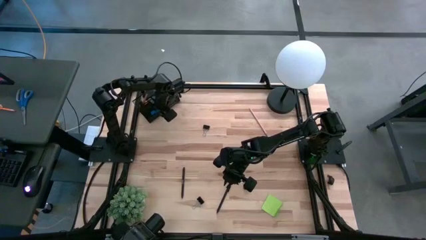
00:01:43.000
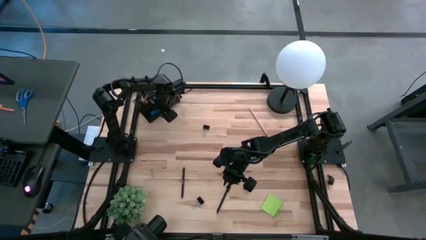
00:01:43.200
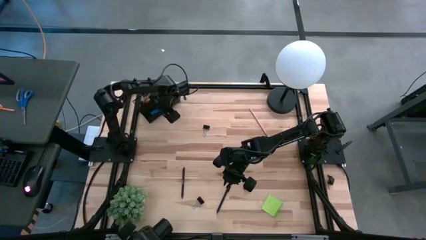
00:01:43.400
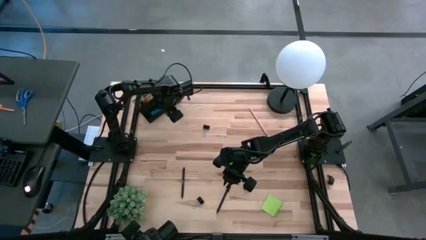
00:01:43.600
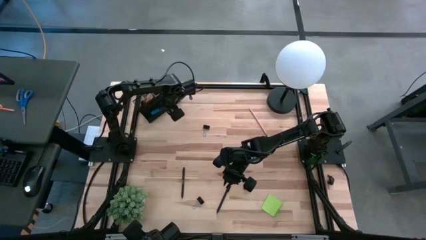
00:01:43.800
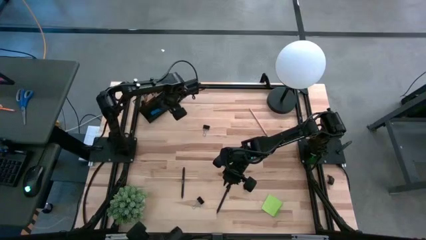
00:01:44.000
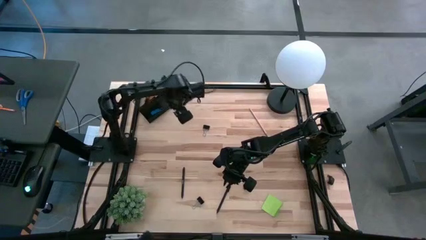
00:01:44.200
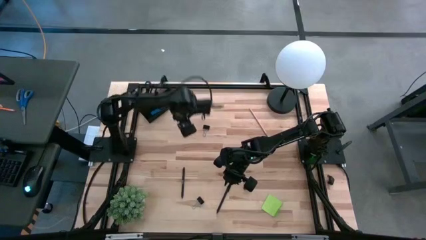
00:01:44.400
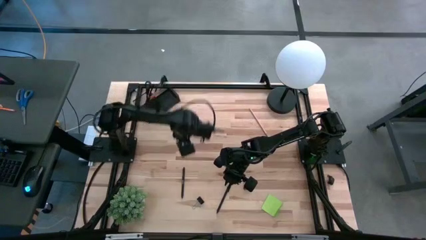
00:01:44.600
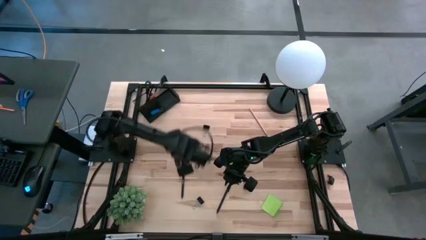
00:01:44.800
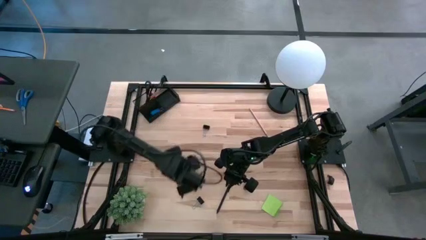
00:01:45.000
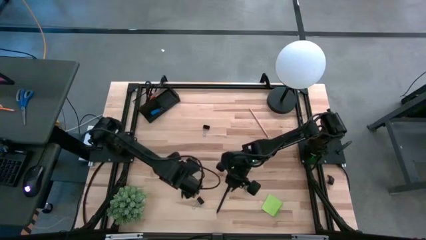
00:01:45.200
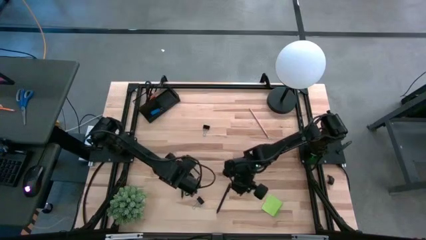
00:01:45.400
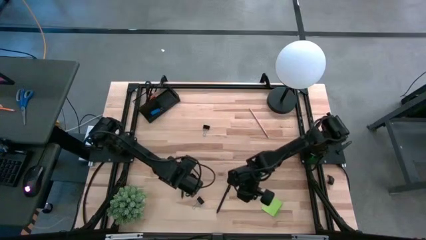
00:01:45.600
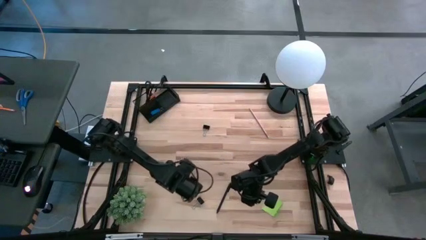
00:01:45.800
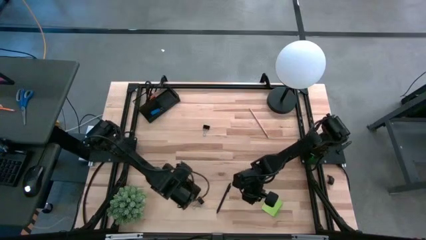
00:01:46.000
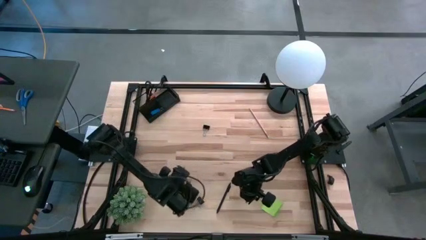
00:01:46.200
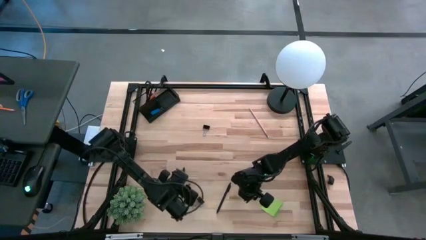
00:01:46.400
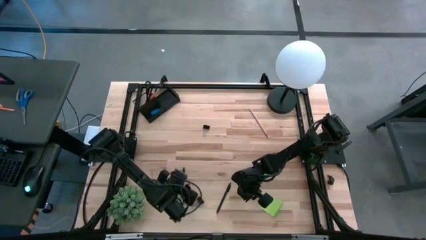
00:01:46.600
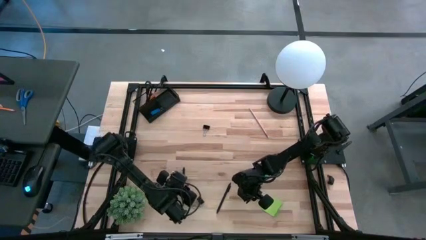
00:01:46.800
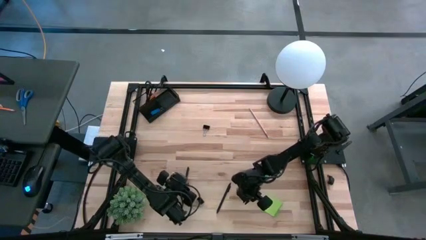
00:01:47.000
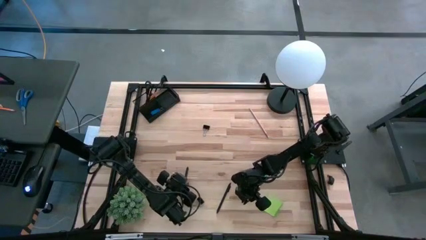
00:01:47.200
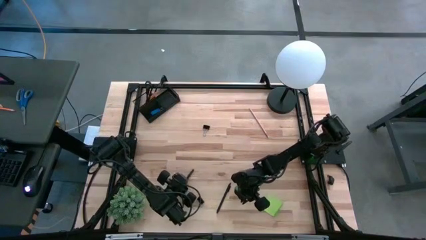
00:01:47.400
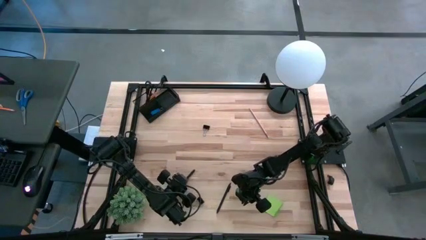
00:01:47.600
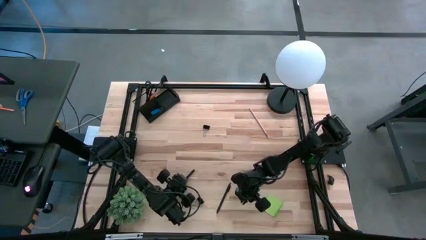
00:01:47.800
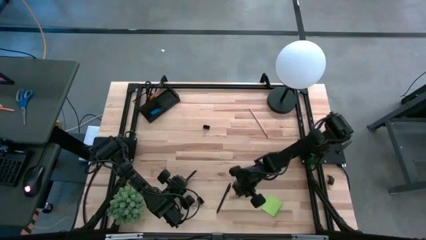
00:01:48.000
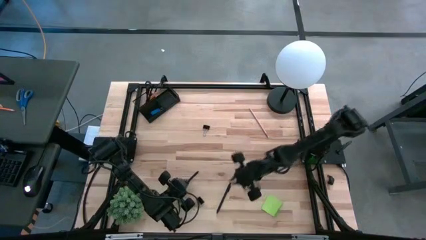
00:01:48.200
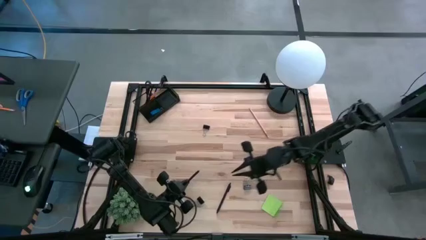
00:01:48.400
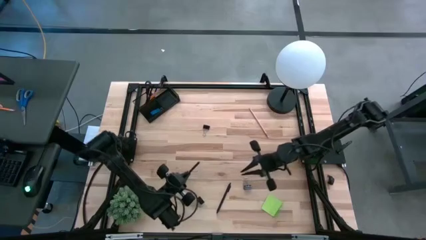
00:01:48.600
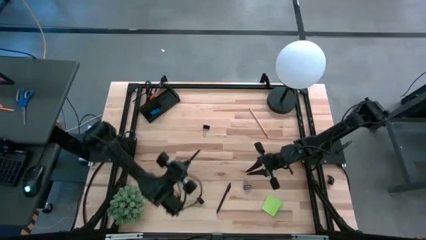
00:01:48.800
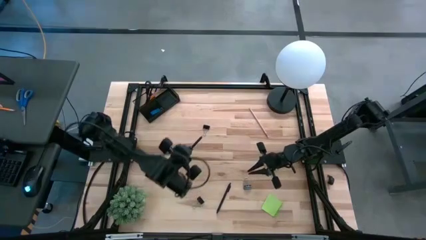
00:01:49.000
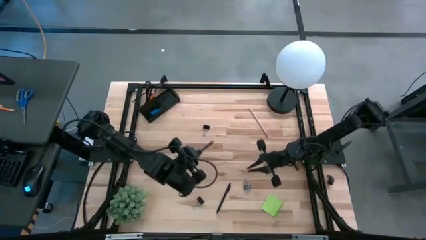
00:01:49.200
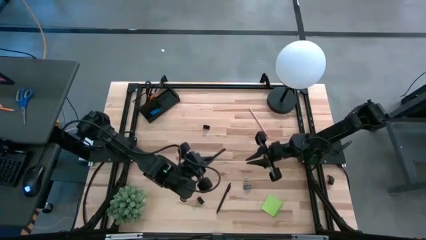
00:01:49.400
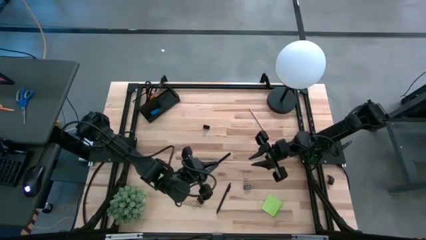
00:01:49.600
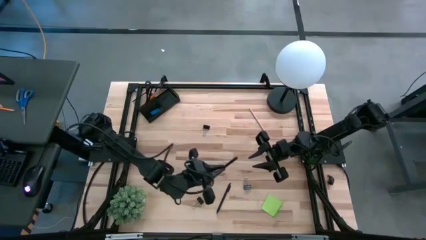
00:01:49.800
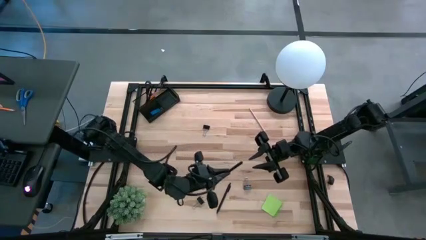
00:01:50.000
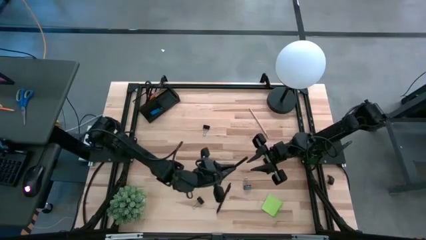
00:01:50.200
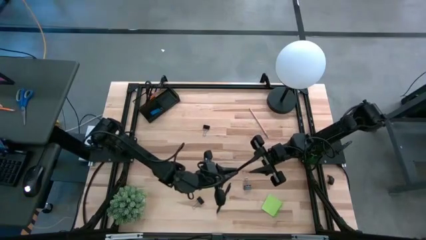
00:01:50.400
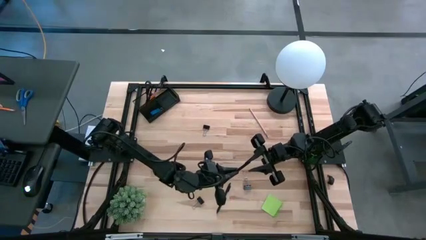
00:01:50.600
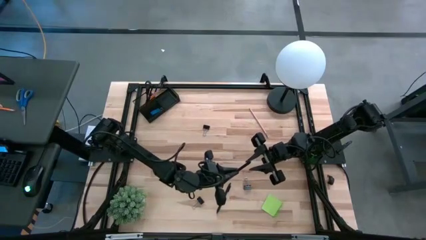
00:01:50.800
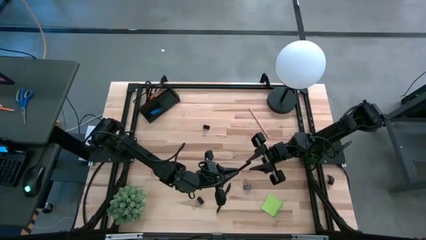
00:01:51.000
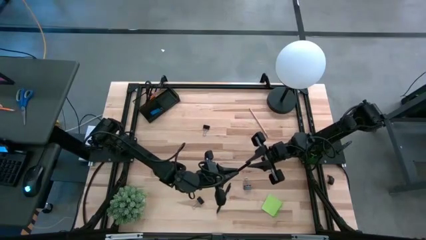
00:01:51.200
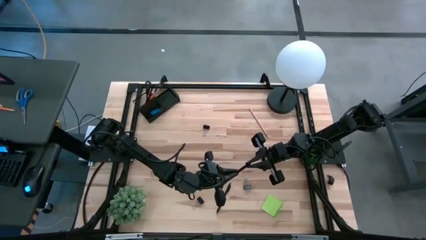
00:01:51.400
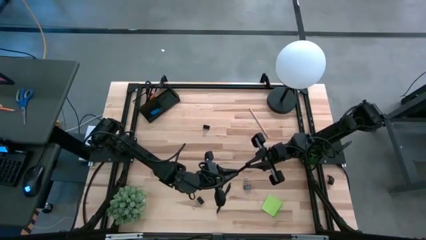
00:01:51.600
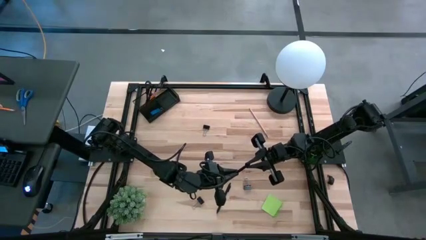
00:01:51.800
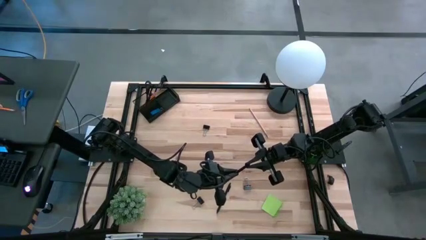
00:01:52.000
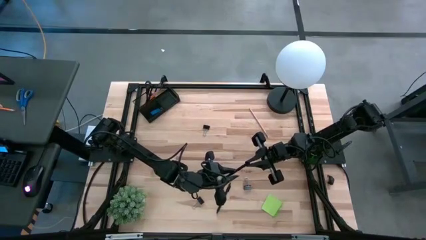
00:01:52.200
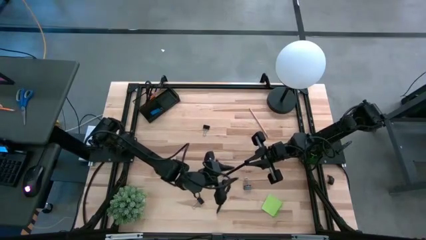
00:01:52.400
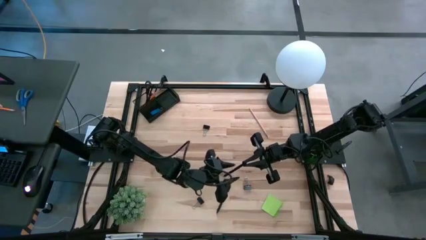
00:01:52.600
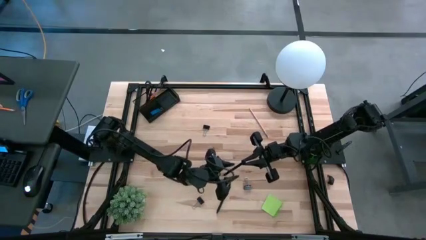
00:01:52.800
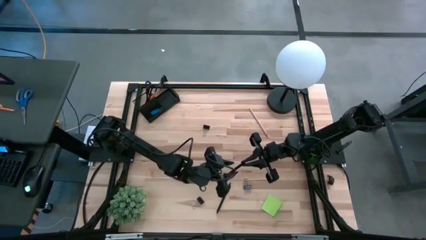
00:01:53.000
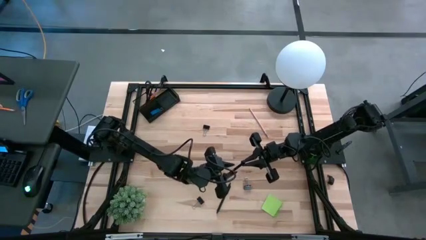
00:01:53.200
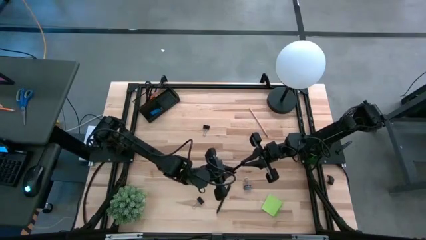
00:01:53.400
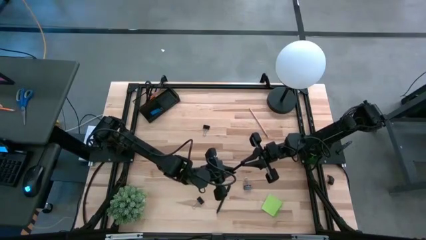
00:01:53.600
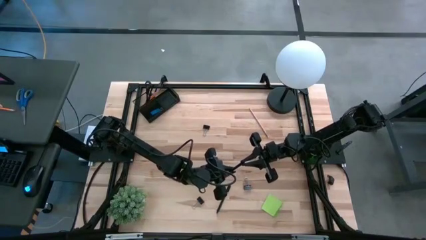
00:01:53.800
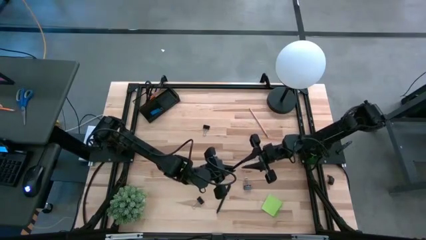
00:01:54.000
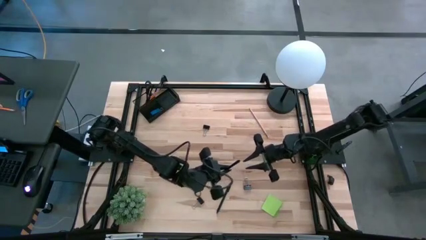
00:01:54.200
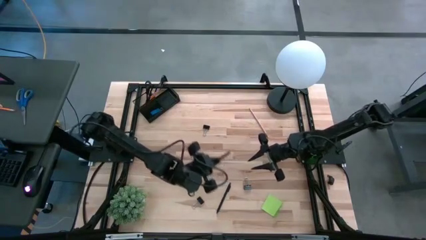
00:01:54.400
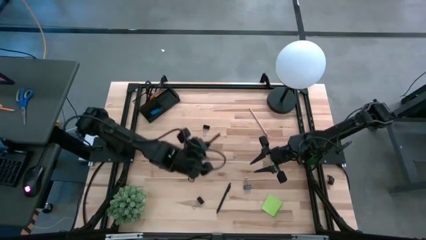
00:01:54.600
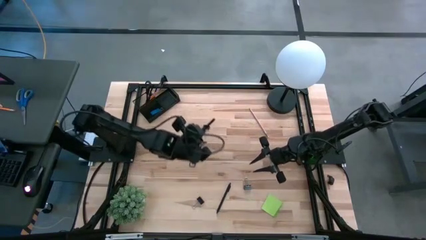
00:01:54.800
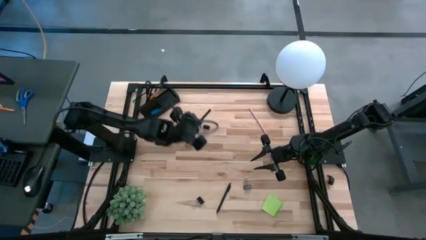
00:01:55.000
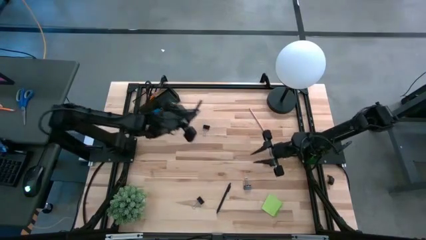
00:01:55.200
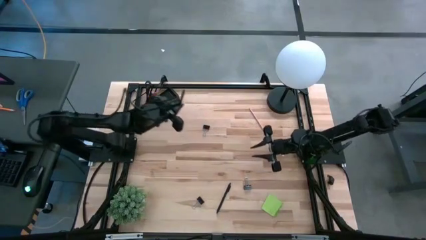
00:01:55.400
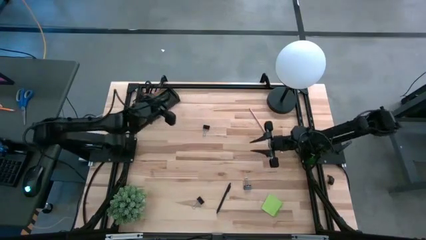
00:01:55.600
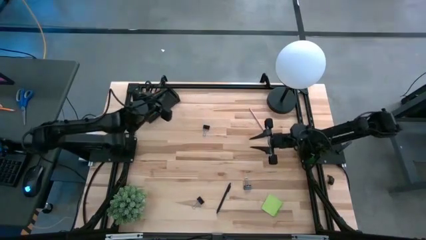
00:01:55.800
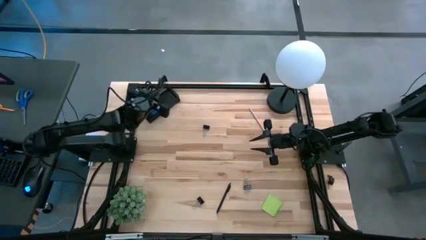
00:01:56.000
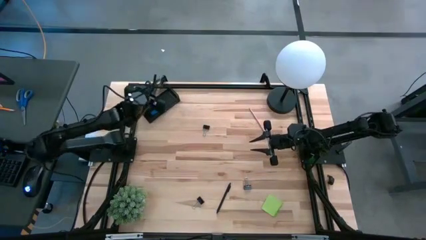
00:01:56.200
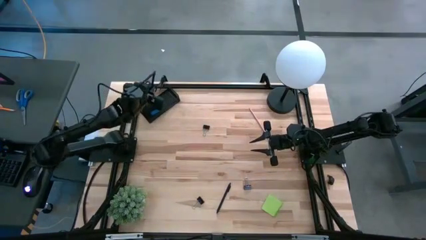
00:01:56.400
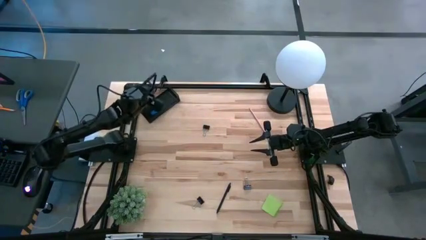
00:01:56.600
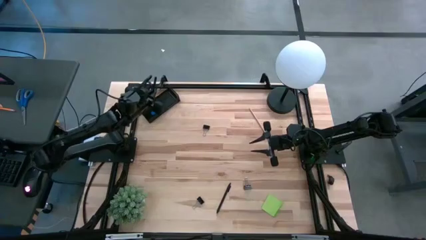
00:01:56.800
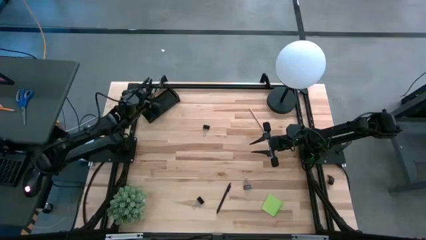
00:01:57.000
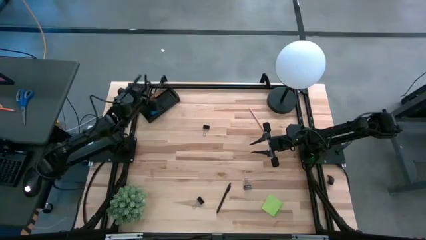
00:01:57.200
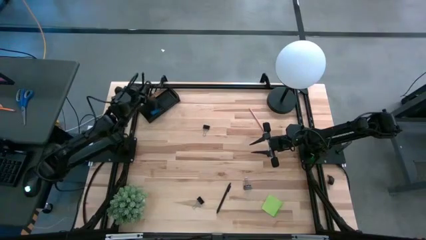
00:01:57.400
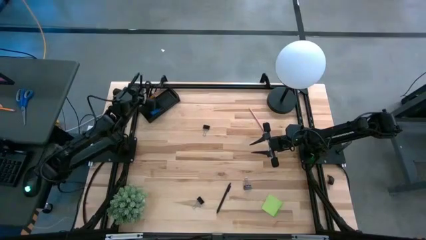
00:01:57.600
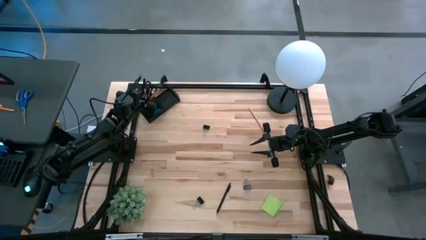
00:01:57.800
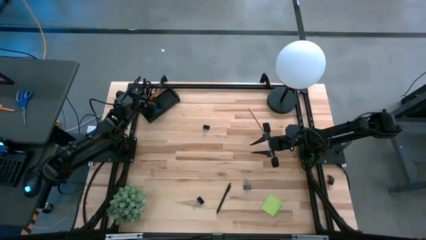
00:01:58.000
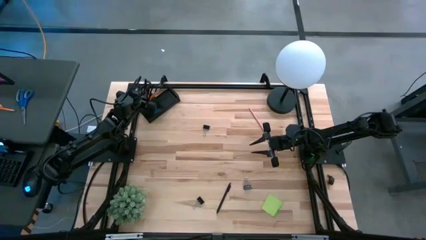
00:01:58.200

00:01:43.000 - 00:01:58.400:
Task: Pick and place office supplies into organizer
Put the black pen into the black desk organizer

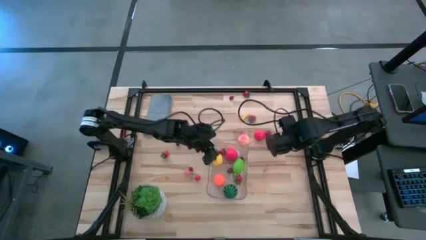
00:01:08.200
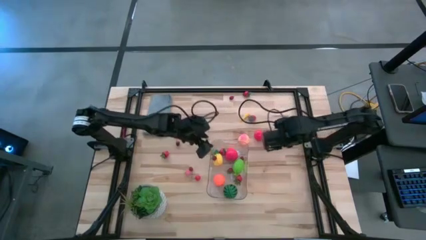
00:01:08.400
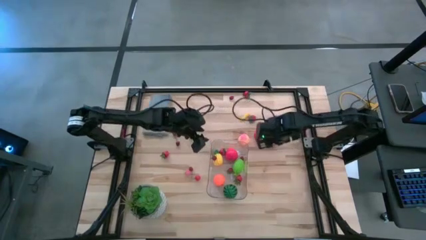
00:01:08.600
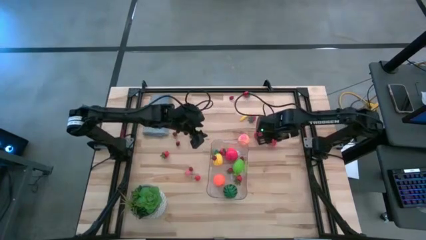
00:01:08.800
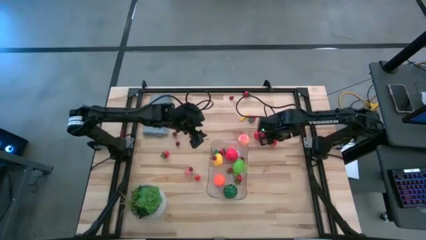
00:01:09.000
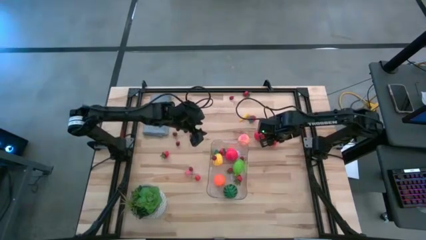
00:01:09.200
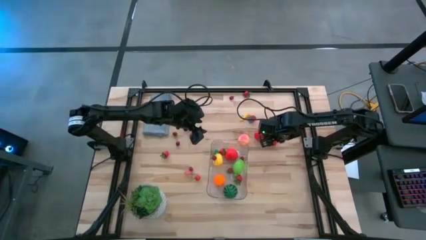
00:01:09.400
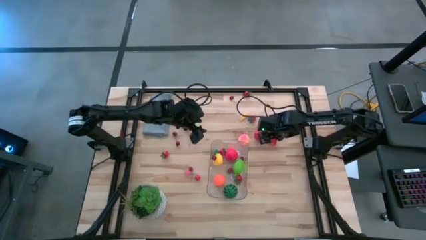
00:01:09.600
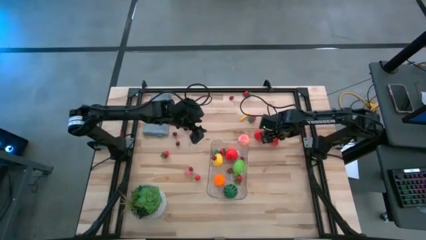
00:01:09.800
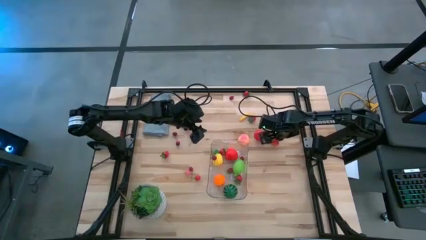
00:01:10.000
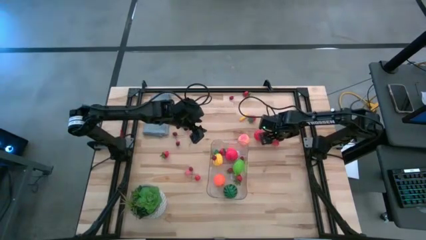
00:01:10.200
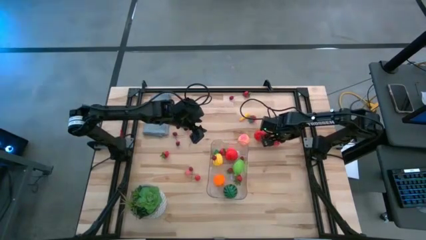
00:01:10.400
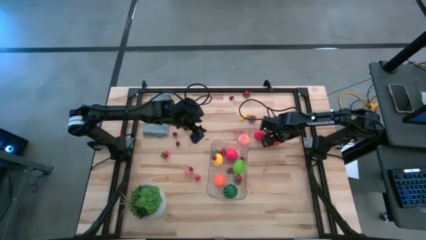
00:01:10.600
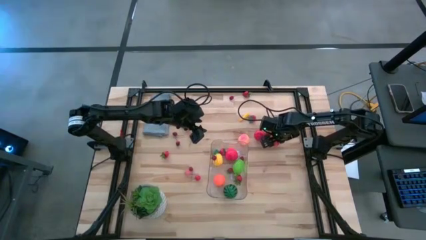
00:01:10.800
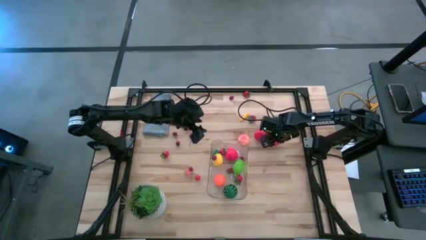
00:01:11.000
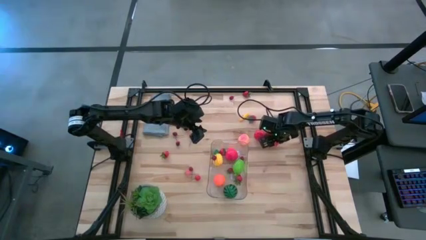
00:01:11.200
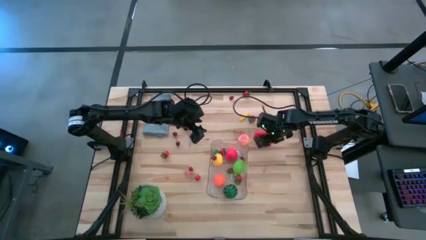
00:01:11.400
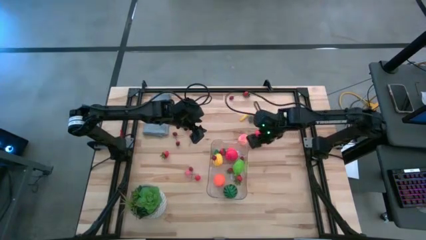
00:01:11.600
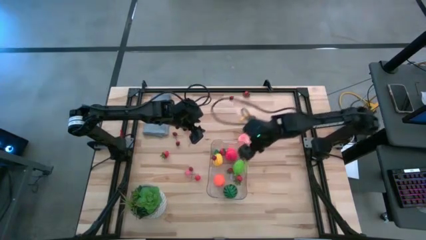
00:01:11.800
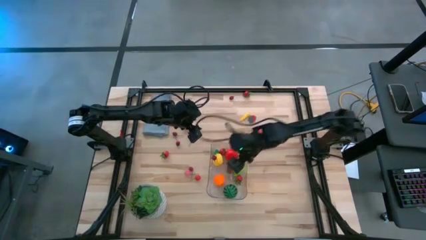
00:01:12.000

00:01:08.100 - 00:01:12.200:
Task: Pick and placing Produce into tupperware
Put the strawberry into the transparent bin
